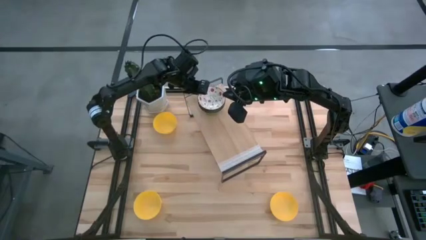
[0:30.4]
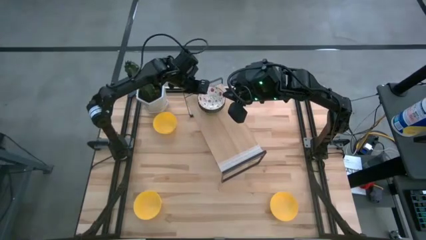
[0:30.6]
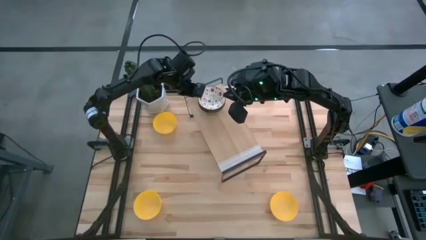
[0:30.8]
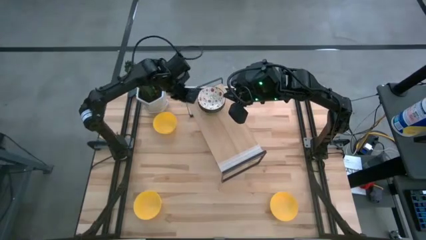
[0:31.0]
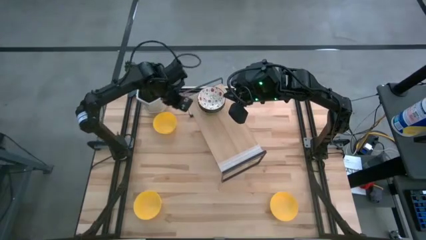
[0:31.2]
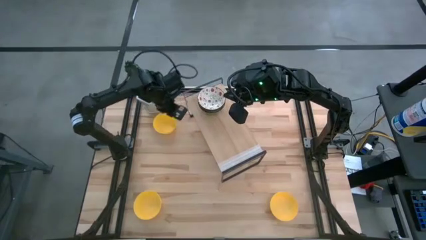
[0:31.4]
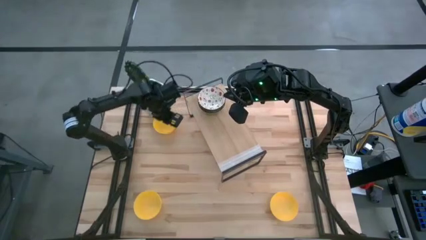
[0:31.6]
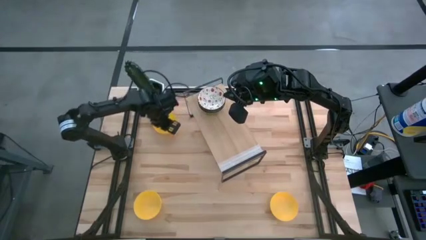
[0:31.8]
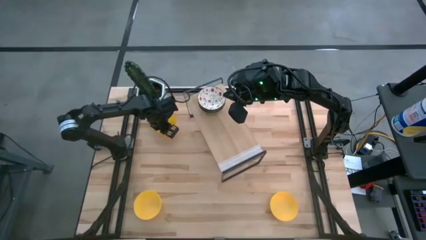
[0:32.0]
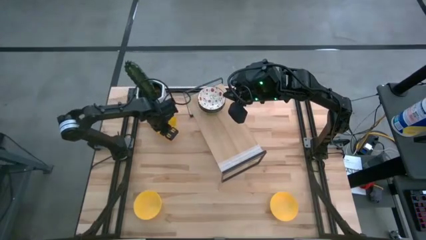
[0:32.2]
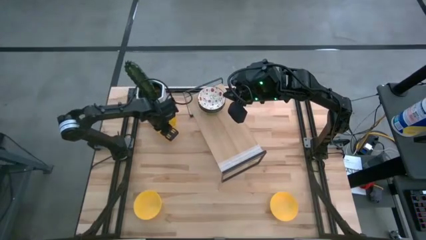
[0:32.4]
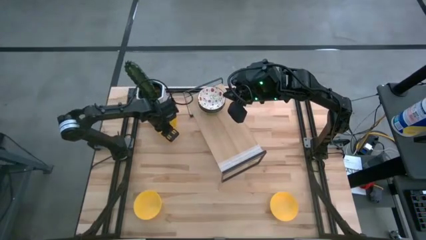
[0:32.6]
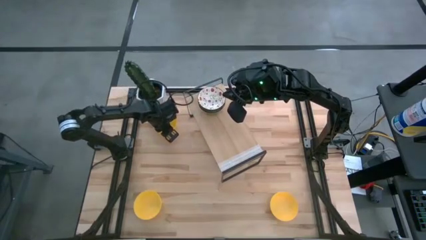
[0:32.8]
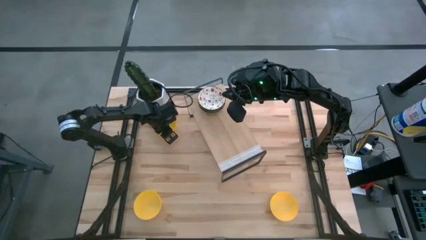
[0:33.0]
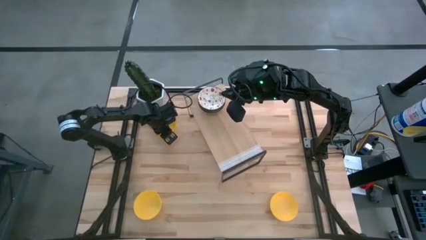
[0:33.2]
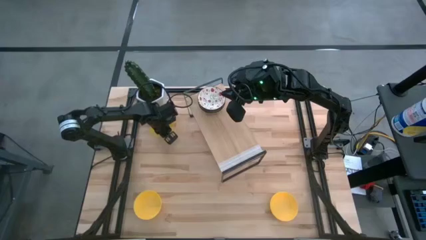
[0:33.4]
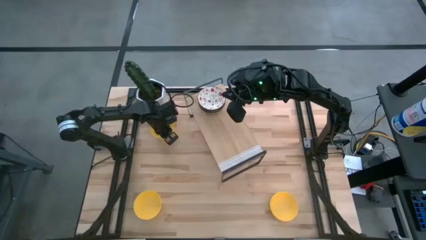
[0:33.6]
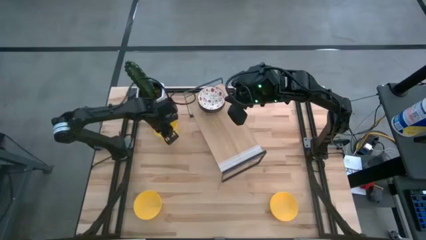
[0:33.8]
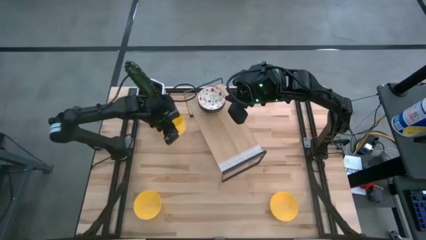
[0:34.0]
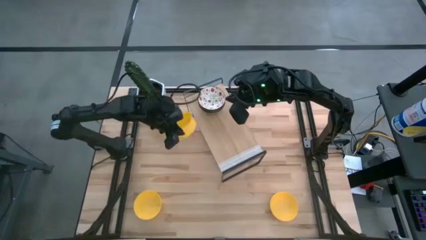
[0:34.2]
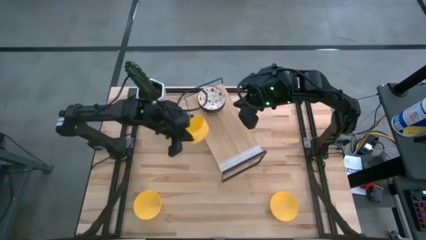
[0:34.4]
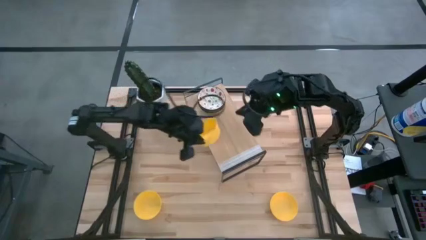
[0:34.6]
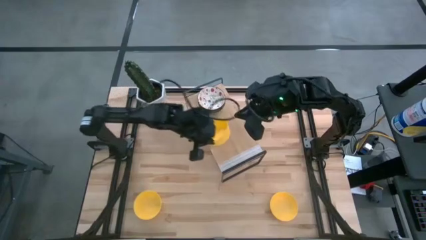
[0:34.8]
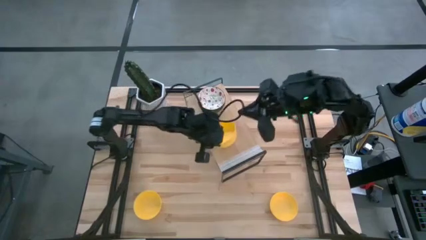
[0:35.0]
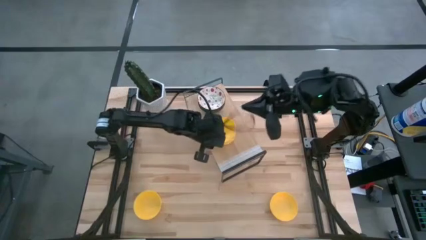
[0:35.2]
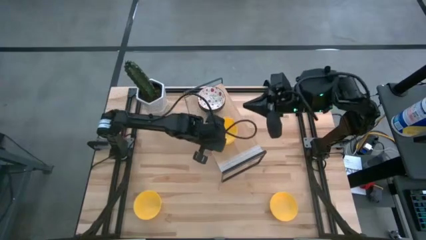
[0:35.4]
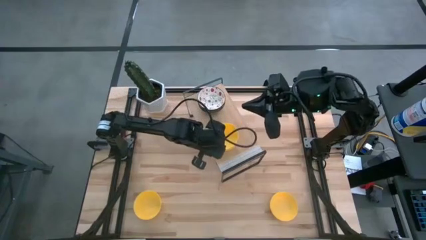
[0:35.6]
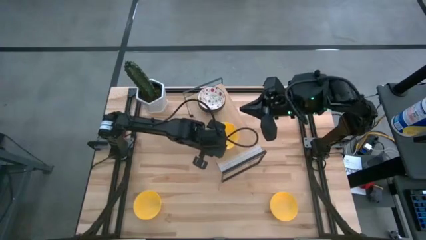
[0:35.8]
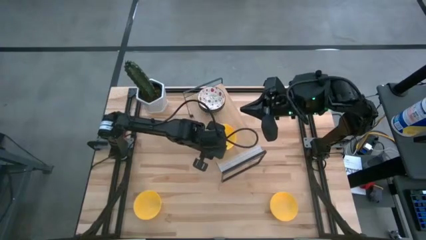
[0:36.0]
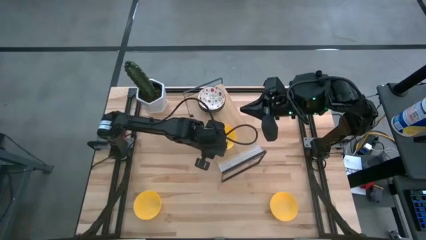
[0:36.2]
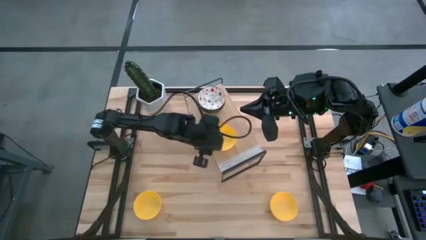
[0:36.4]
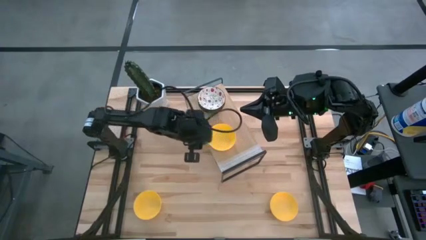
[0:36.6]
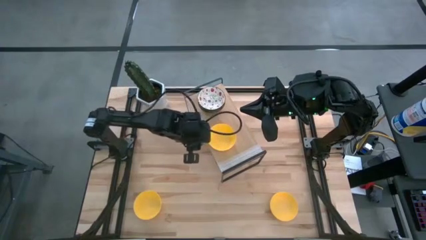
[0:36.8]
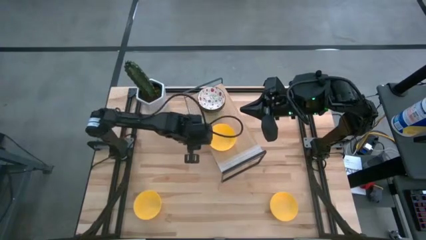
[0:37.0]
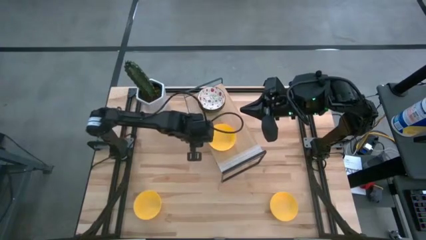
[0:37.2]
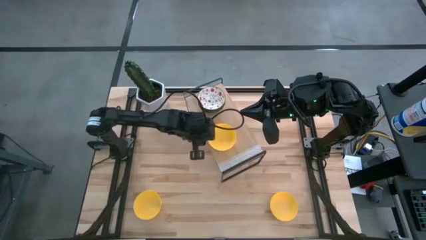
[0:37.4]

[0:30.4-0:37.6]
Task: Pick & Place Mini bowls
Put the top yellow bowl on the shelf

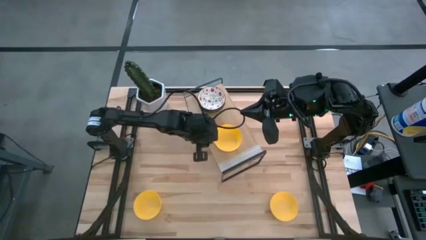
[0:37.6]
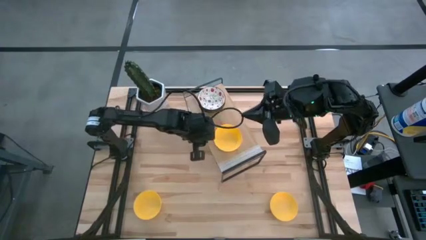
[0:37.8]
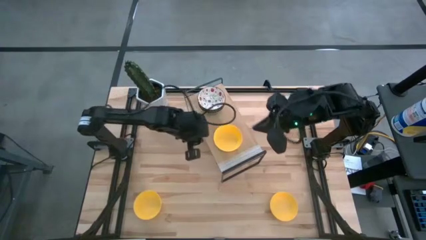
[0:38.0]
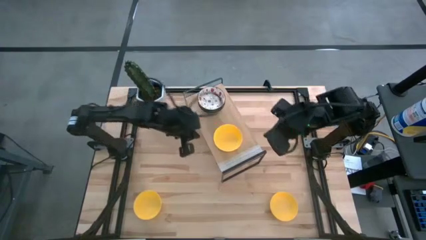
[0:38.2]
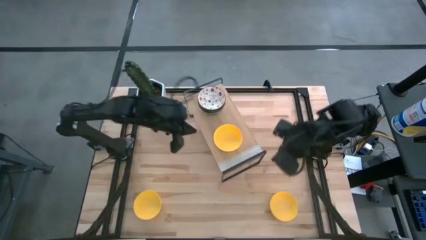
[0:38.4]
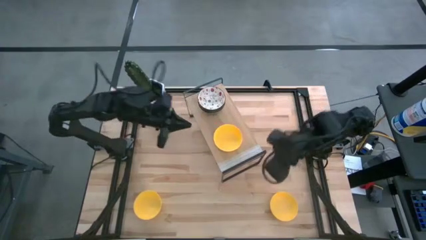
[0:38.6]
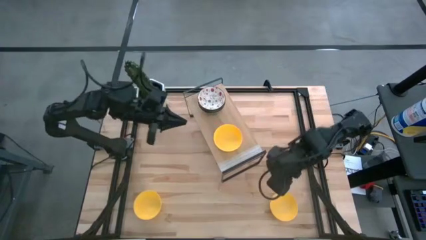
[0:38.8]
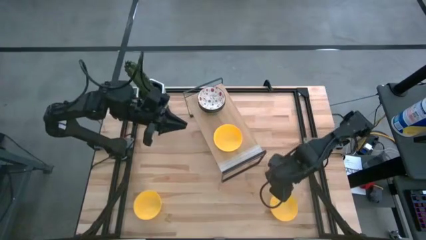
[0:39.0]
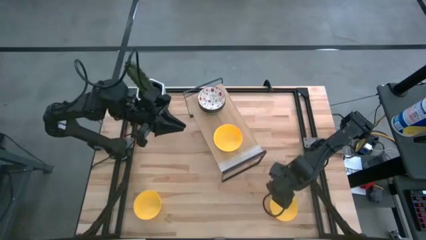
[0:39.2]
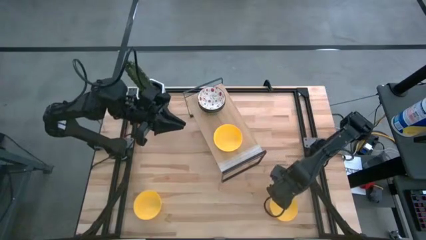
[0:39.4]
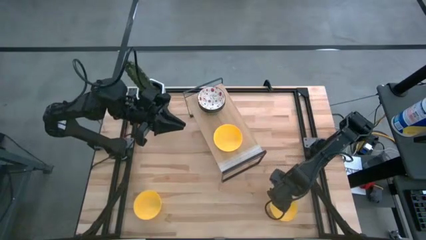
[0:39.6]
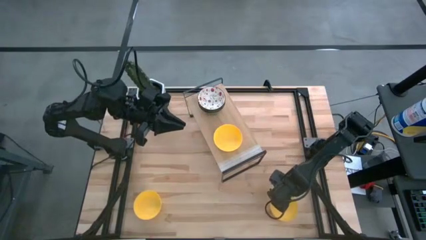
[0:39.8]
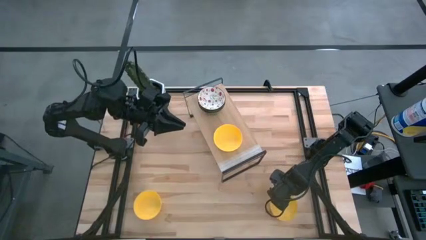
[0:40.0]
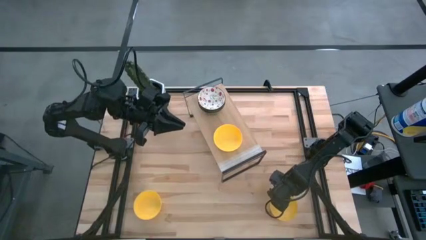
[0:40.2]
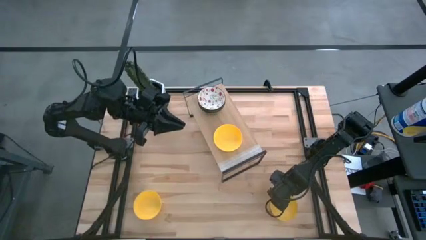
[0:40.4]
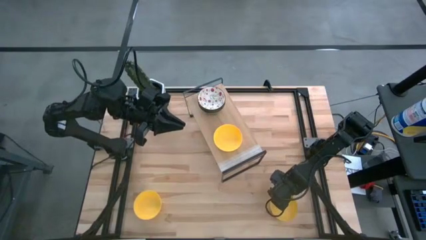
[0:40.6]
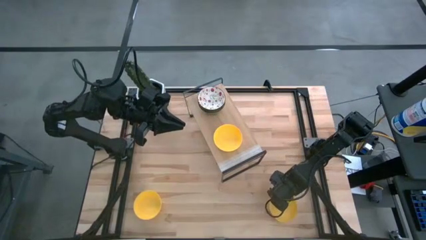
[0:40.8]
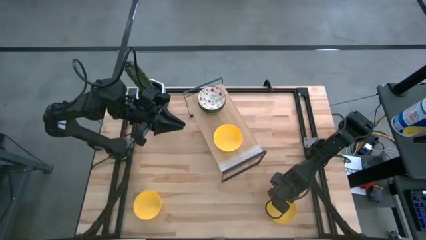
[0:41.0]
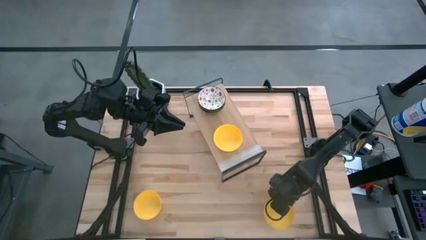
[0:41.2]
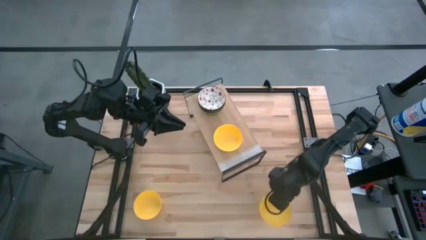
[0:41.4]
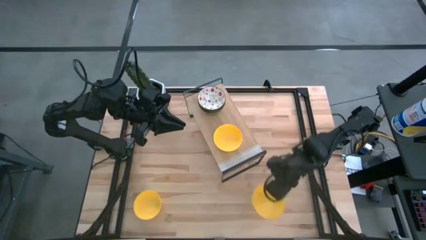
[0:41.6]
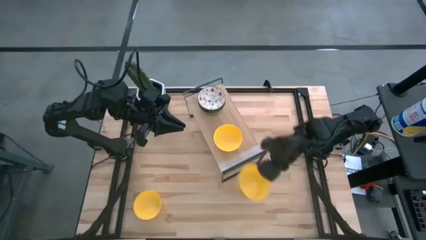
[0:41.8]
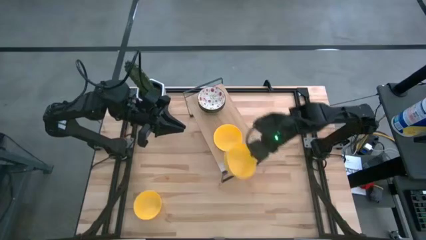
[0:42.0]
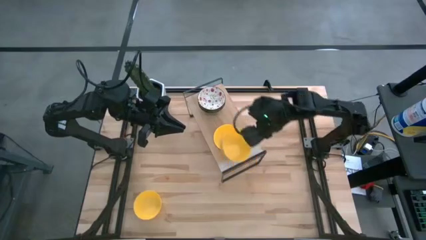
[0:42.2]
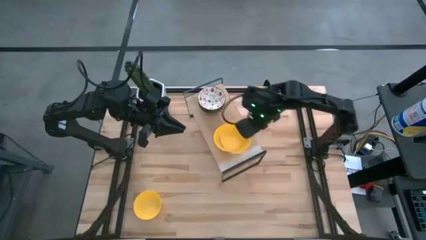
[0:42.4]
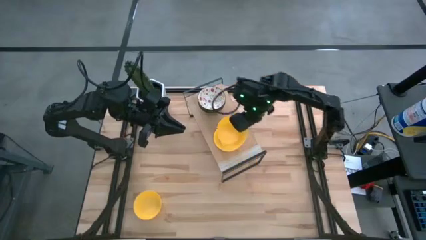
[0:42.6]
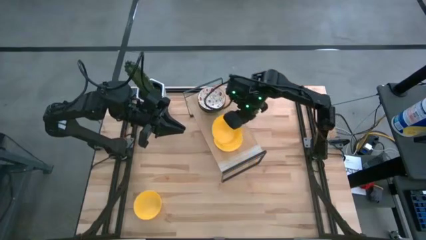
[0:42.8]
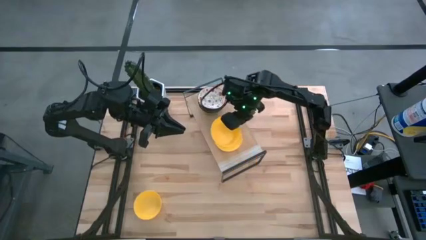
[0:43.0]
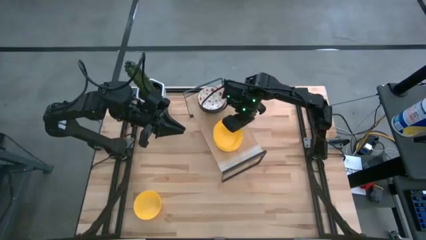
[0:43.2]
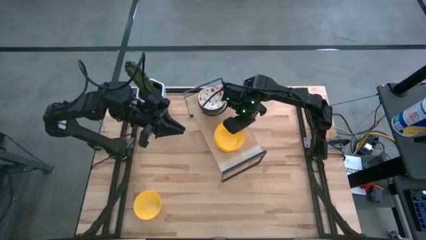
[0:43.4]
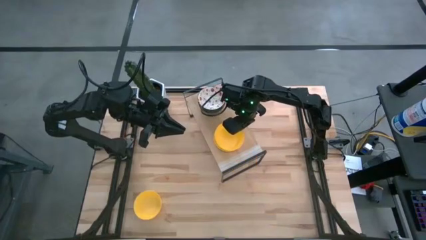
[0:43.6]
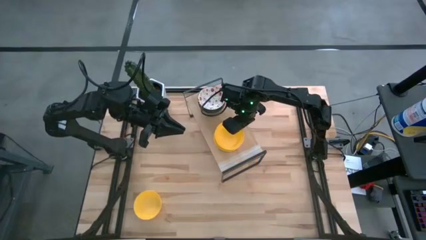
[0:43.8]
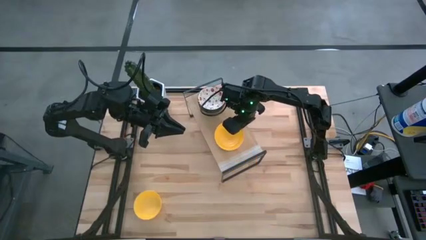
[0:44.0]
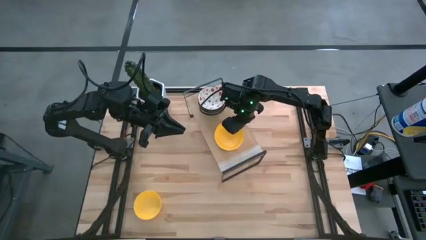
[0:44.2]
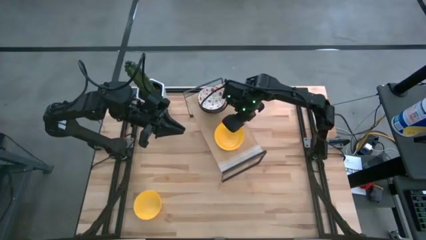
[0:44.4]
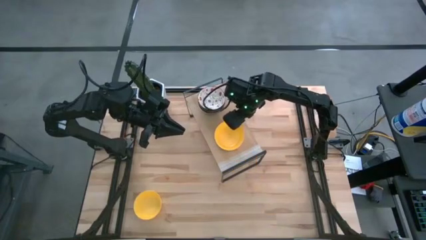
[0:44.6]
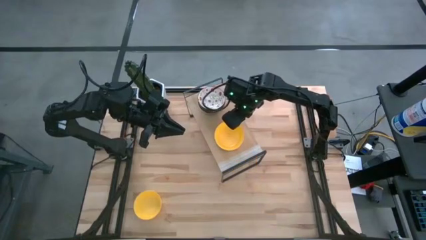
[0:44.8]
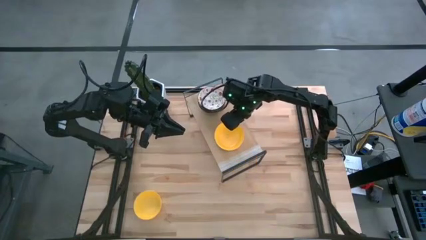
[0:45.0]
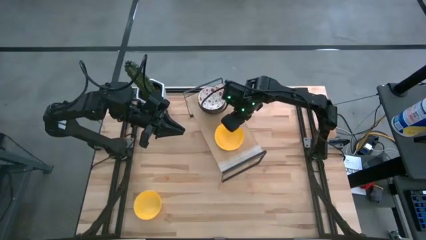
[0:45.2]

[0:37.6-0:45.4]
Stack the right yellow bowl on the yellow bowl on the shelf

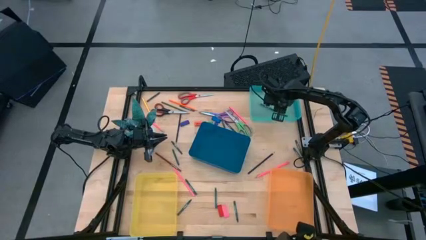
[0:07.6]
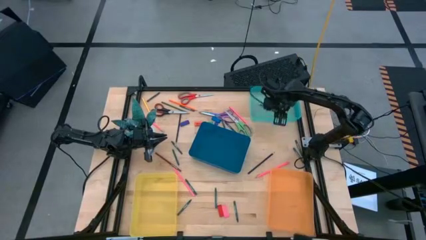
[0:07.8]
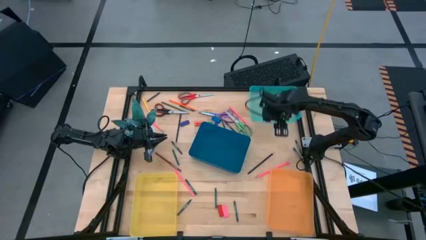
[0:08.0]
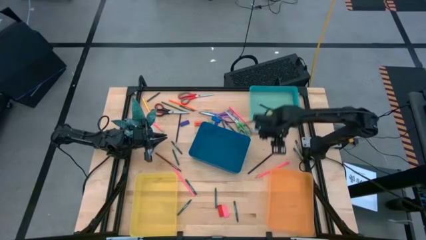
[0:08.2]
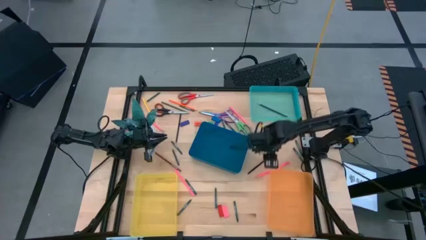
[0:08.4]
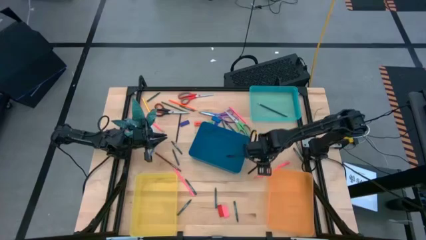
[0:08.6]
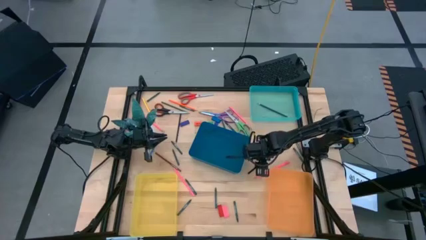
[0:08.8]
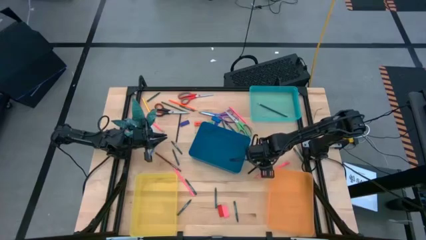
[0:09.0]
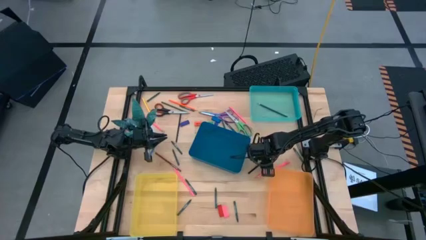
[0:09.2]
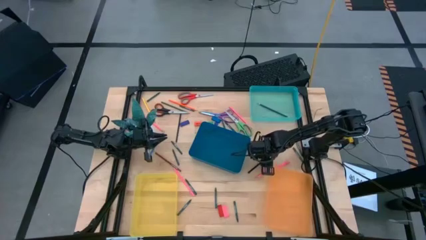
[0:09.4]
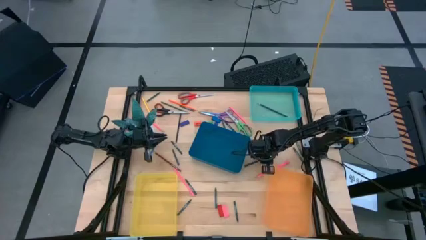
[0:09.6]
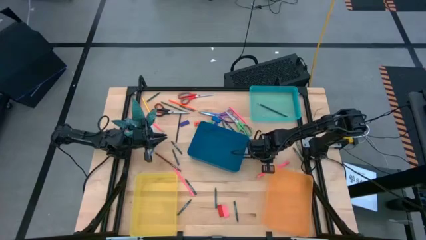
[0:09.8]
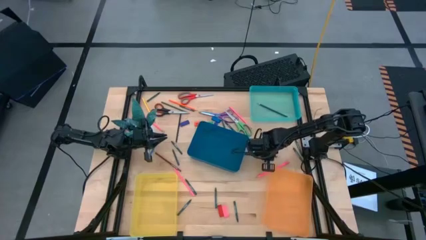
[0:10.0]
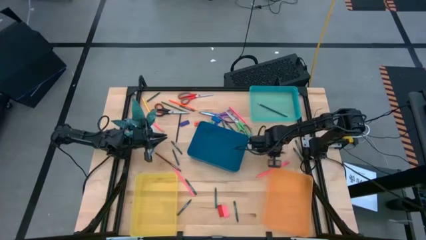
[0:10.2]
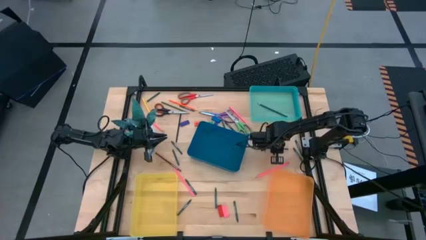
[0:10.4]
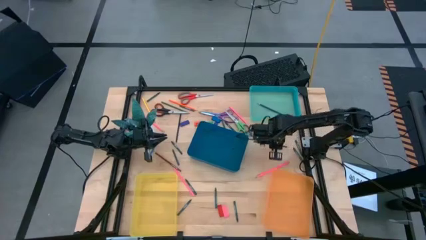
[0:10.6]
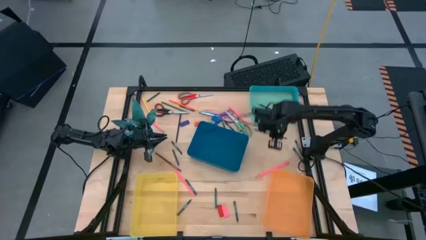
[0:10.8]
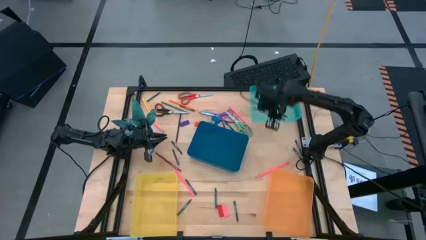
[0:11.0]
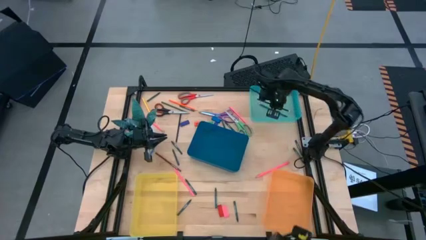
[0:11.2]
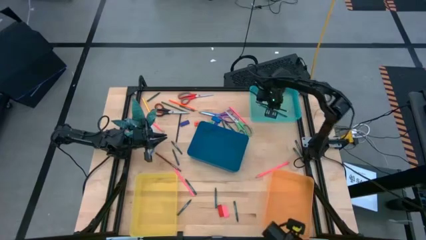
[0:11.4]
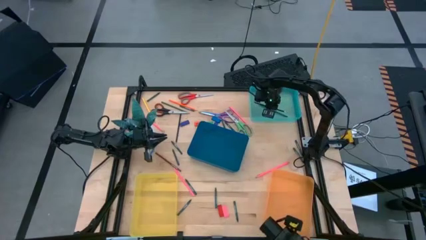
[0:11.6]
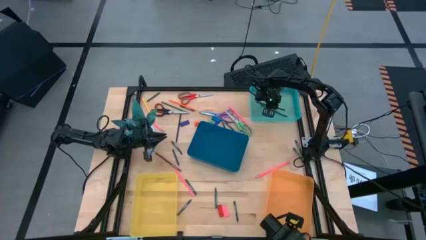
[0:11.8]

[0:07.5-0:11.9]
Task: Sort crayons/erasers/pens/pencils in bins
Put the dark blue pencil into the green bin
